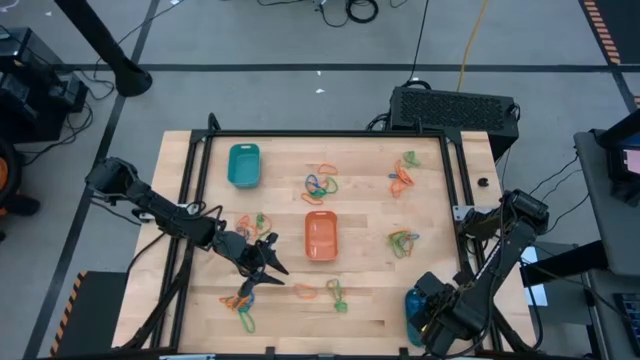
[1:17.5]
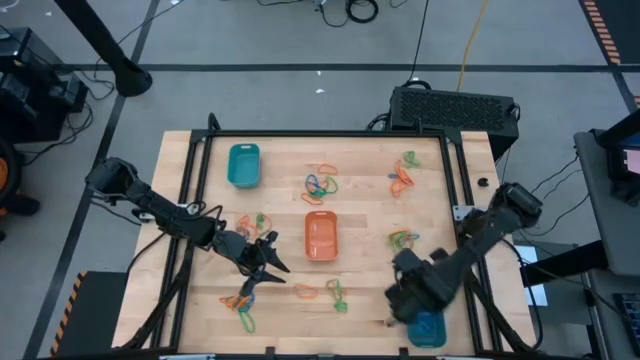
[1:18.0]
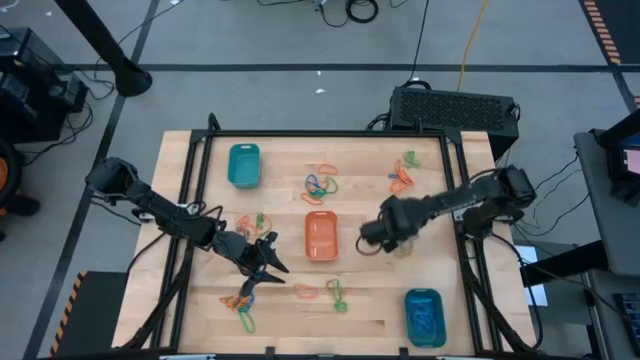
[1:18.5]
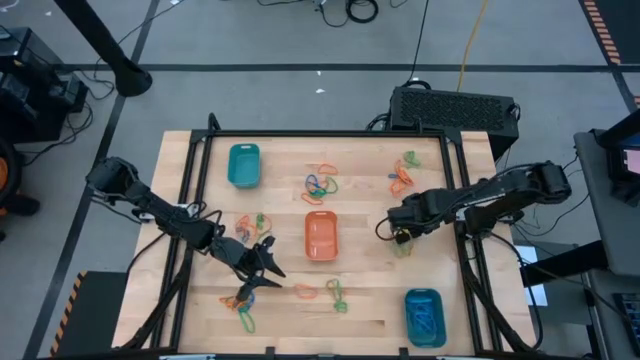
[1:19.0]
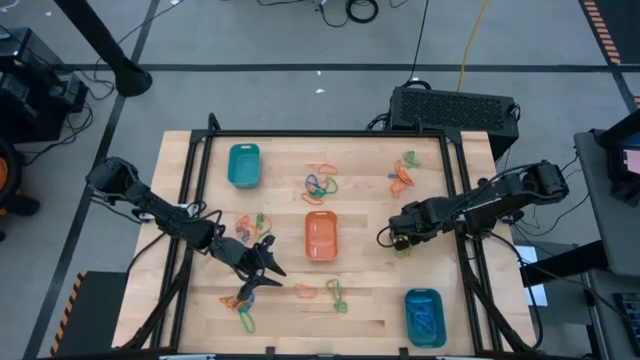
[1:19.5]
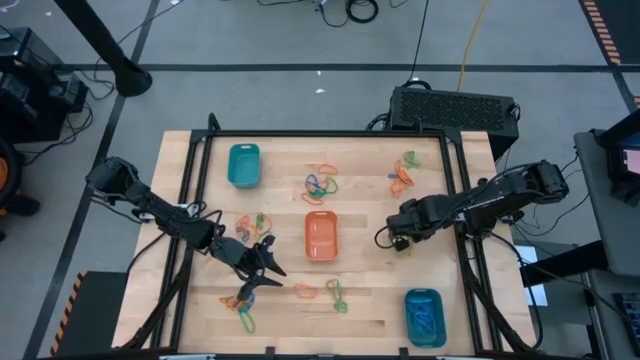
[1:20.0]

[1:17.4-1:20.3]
Task: Sort rubber bands into baskets
Put the blue rubber band into the blue bin

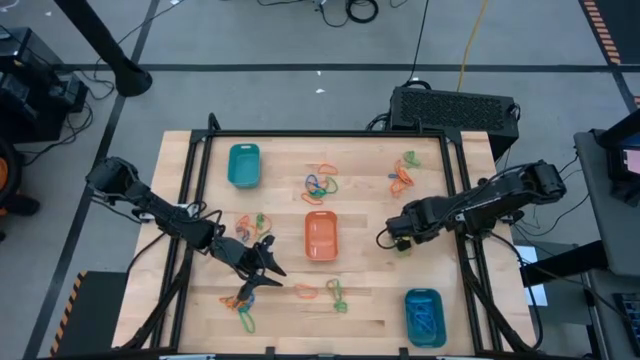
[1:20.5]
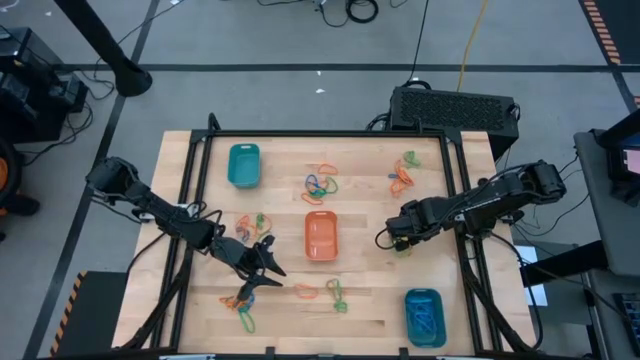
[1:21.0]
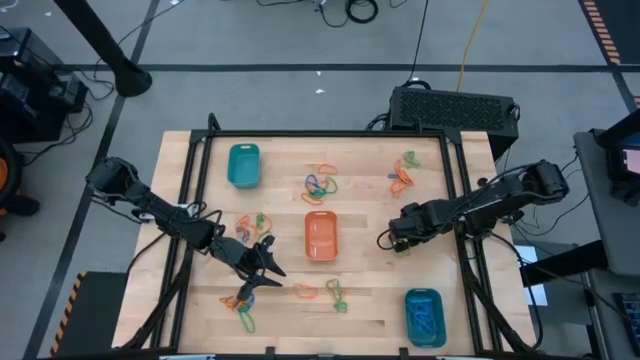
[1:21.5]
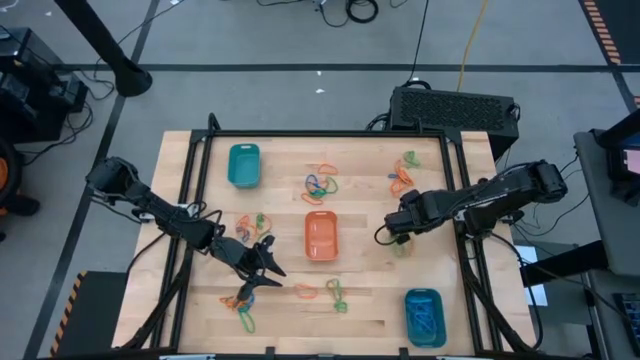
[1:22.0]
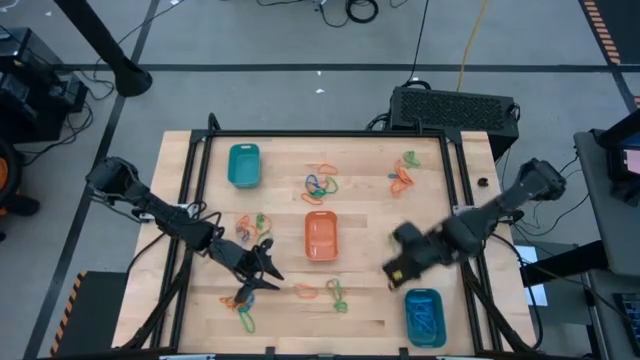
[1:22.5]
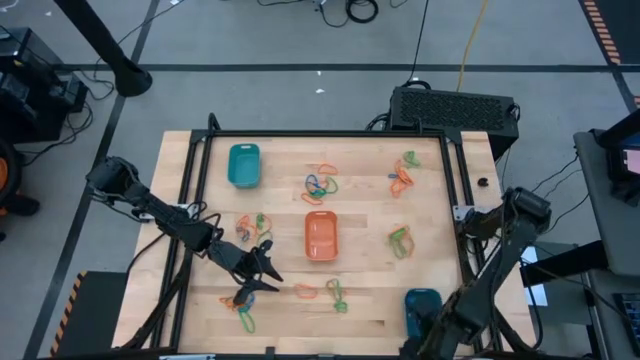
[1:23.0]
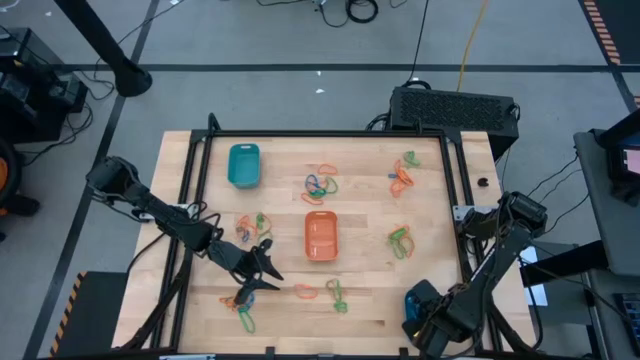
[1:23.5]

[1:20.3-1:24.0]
Put the blue rubber band into the blue bin

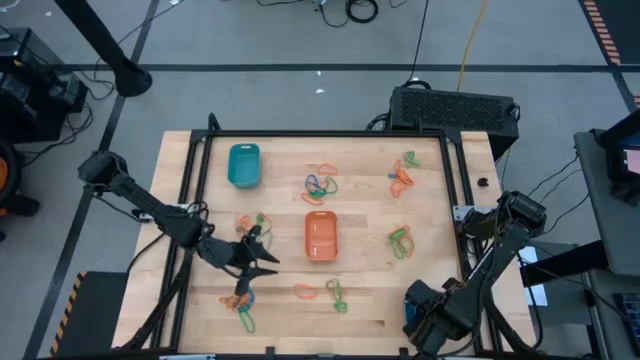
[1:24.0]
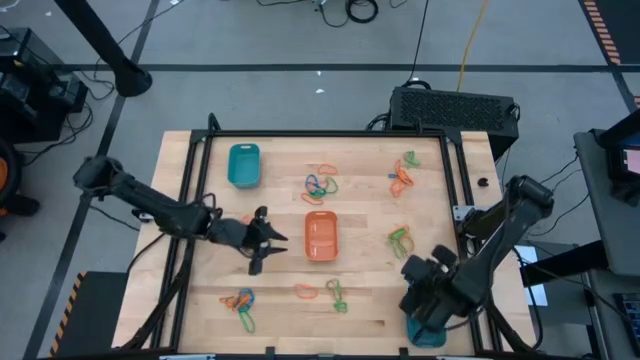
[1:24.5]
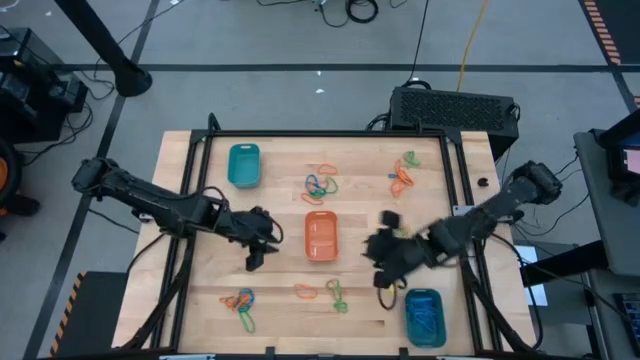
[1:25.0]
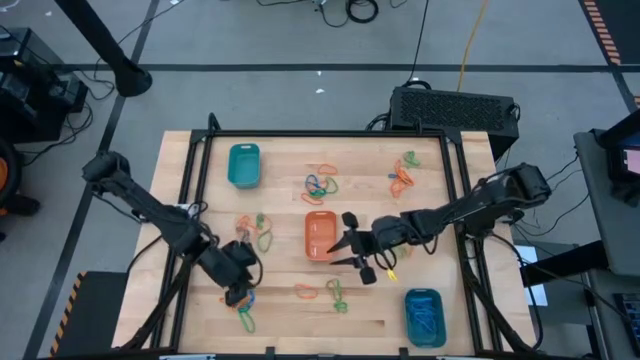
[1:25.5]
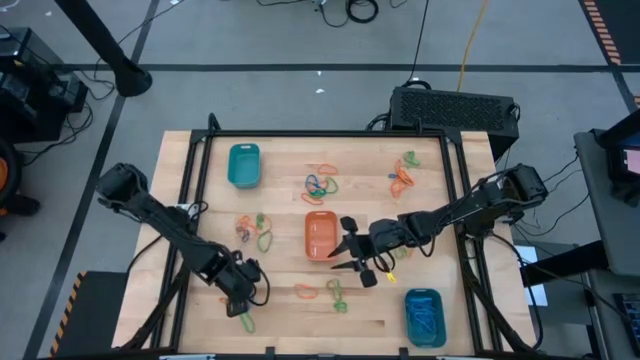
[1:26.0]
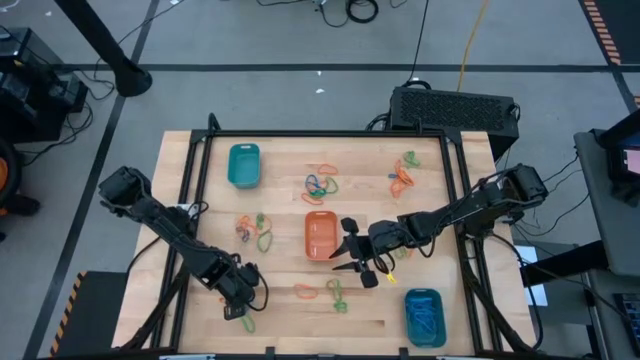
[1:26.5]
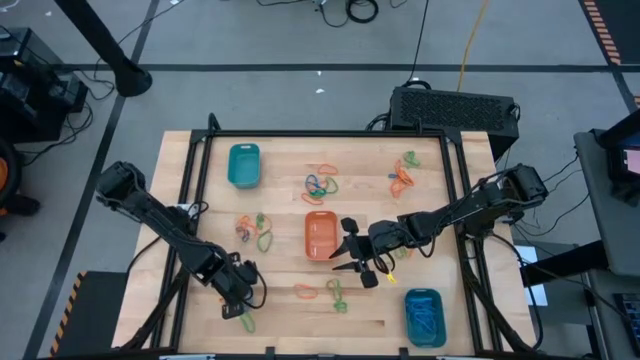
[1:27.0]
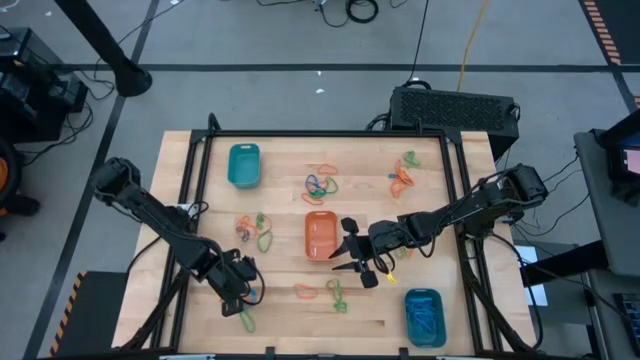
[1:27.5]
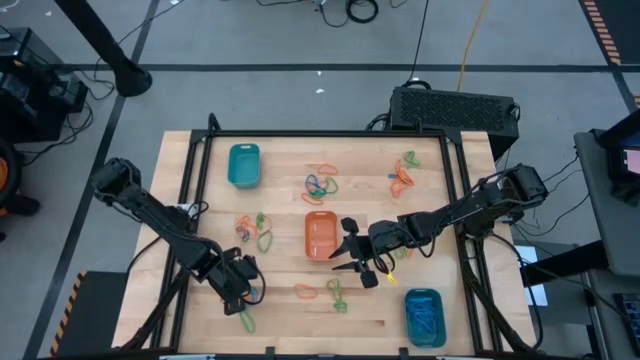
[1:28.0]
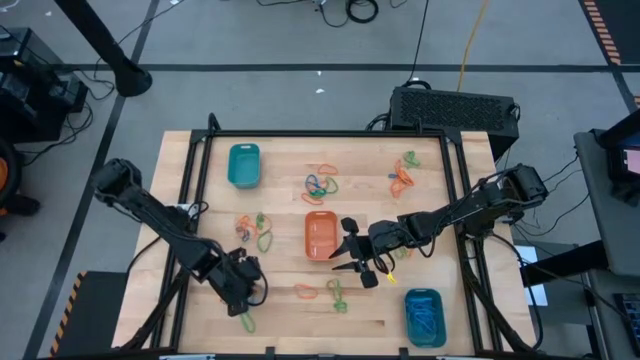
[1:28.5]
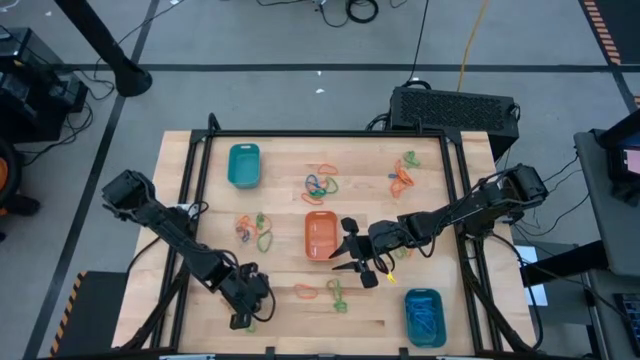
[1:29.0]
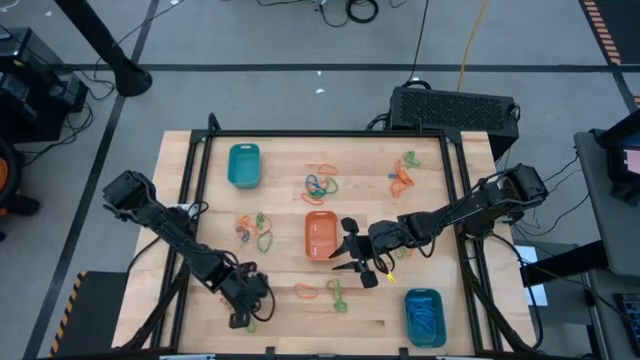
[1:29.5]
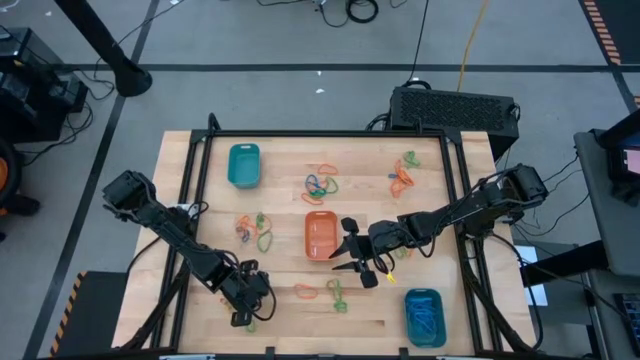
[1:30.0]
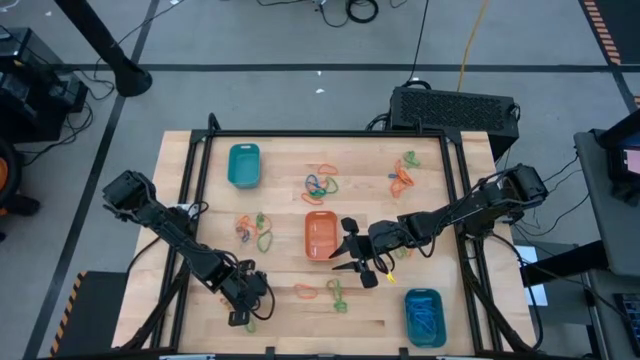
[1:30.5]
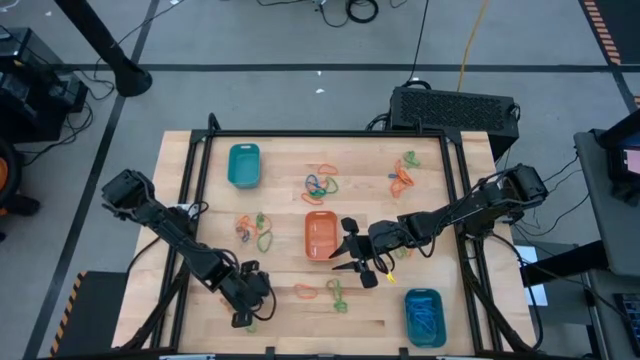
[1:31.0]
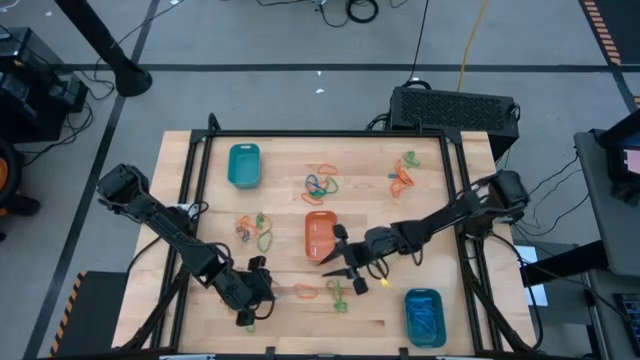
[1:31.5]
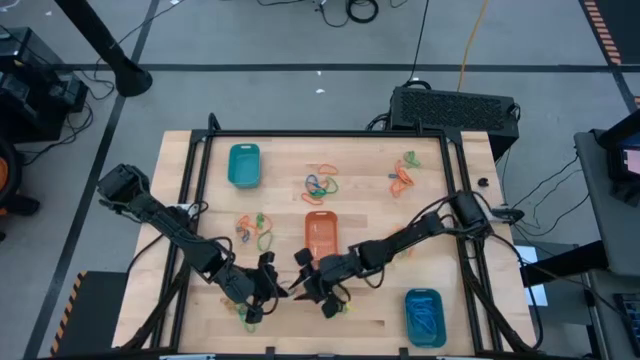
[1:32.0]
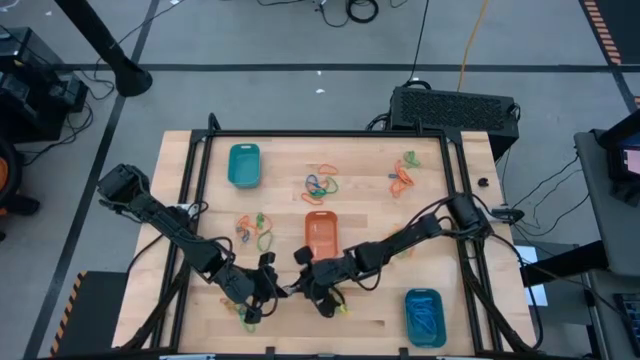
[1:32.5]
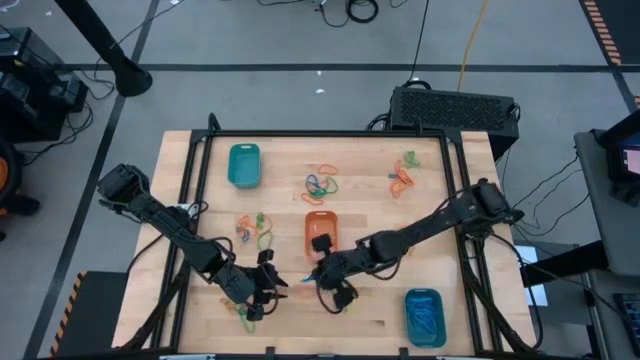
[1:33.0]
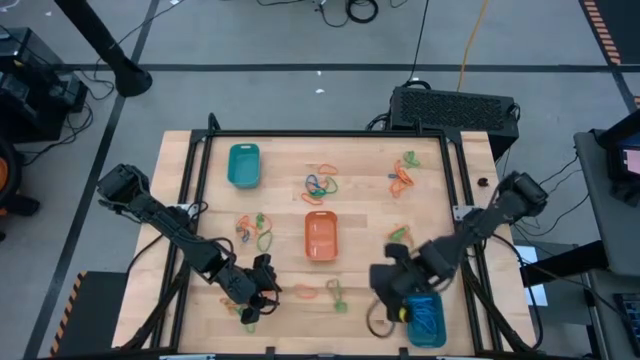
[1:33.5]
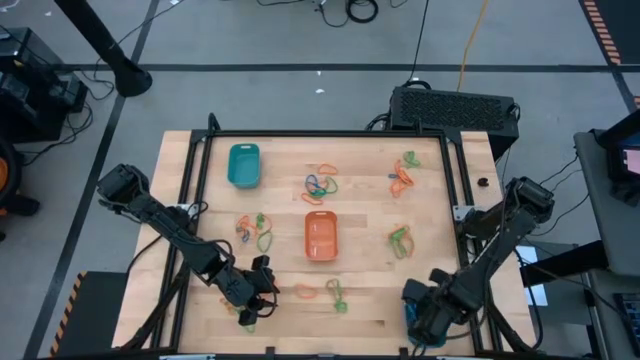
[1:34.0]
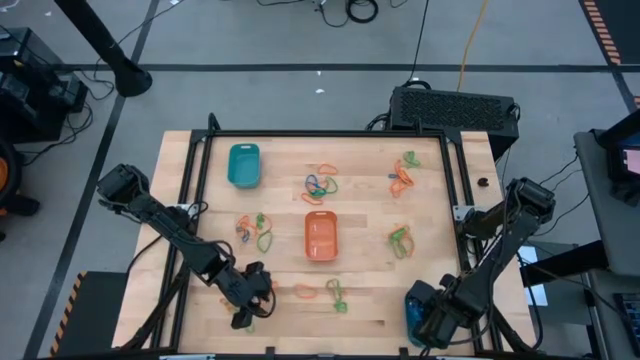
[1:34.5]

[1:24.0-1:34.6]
Put the blue rubber band into the blue bin

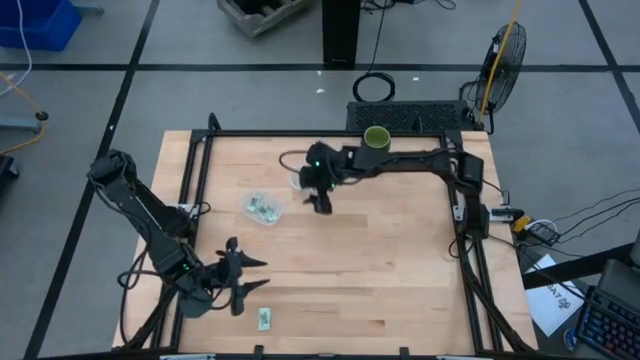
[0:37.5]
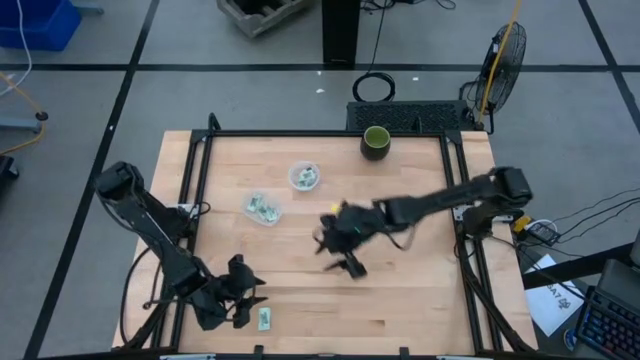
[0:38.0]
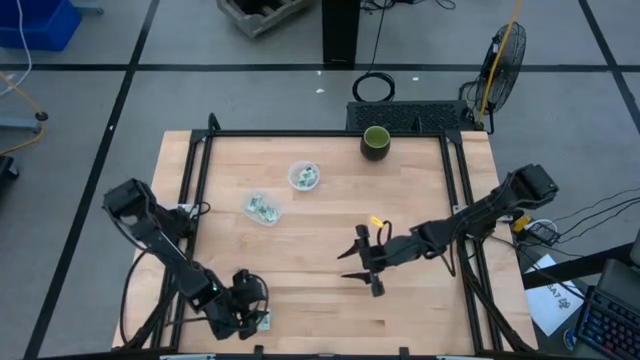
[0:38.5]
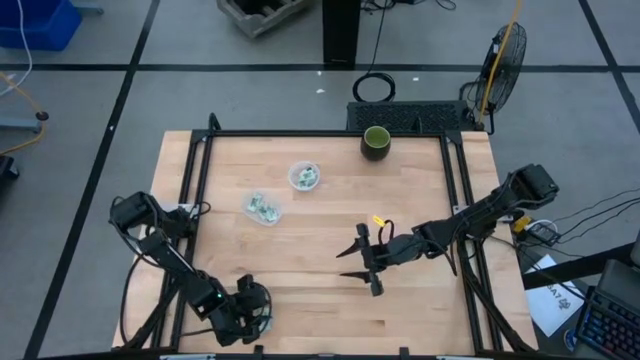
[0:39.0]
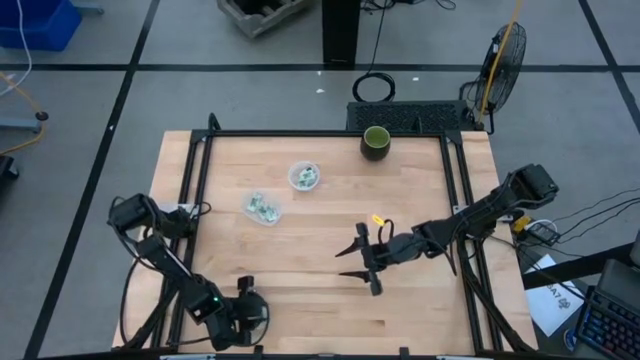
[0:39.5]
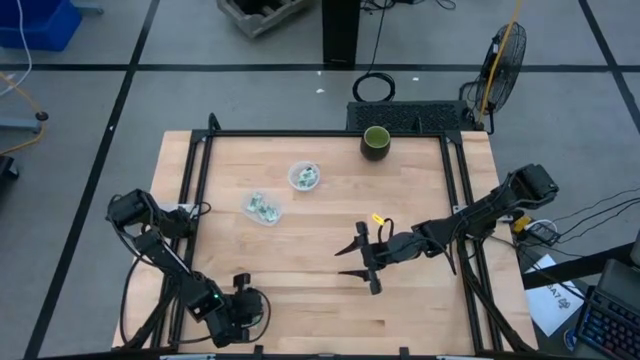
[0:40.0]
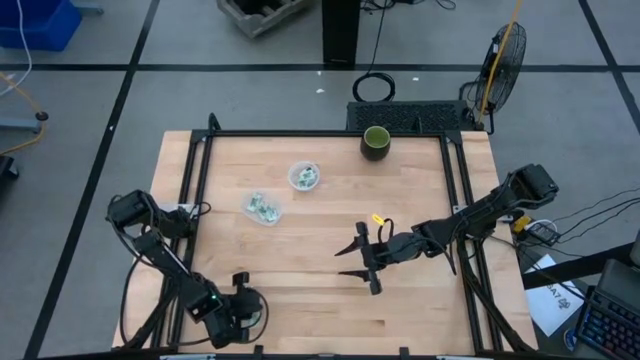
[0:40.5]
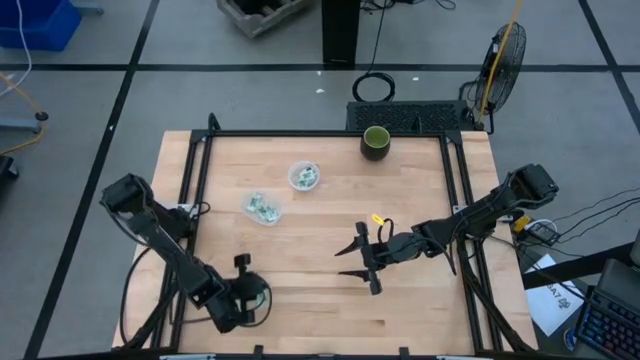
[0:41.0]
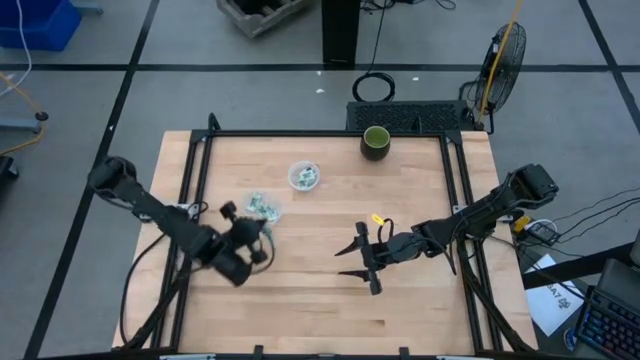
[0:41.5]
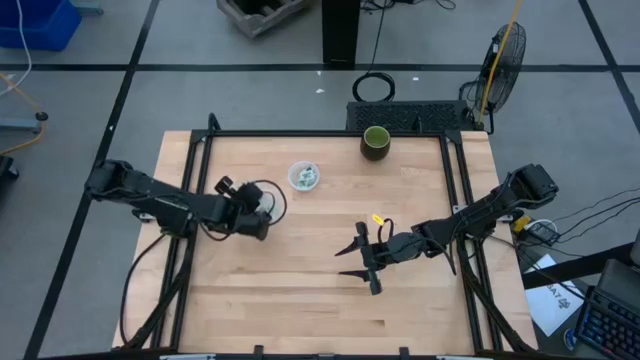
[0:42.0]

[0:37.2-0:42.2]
Task: Pick and place Stevia / Truvia into bins
Put the stevia packet into the bottom container
